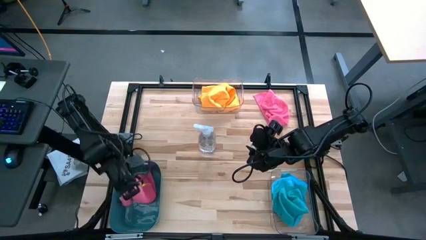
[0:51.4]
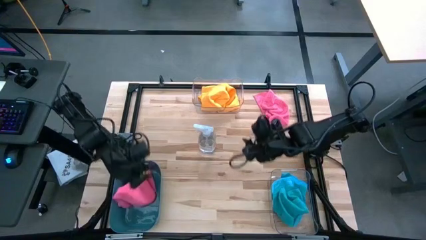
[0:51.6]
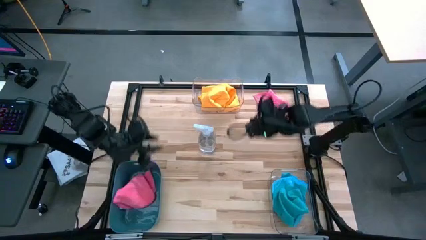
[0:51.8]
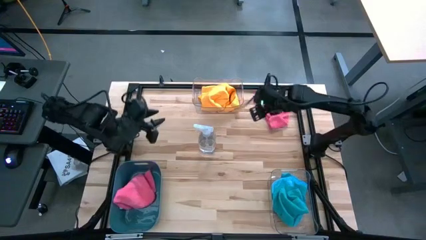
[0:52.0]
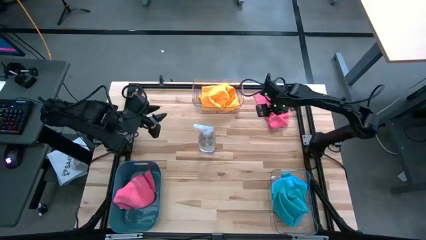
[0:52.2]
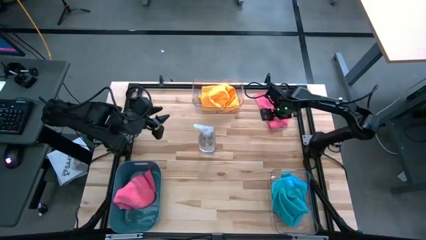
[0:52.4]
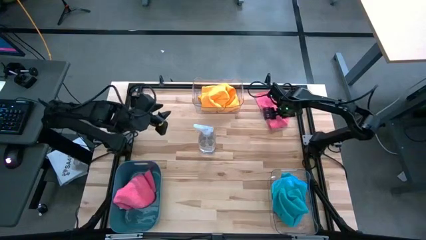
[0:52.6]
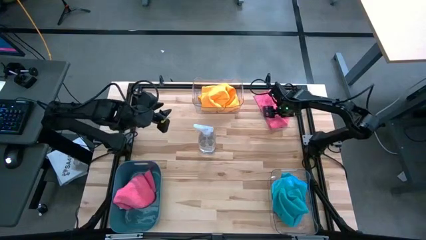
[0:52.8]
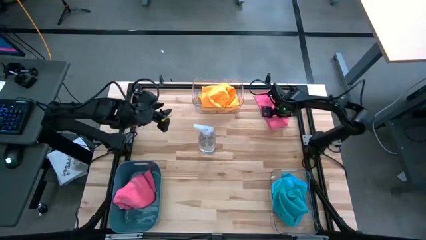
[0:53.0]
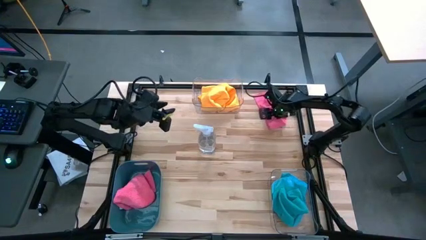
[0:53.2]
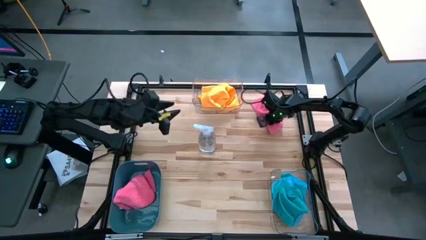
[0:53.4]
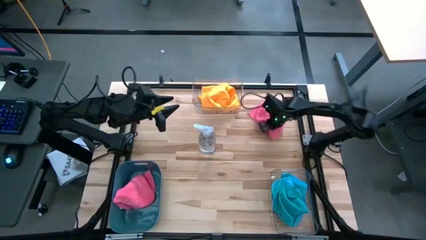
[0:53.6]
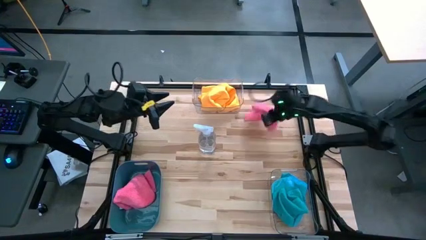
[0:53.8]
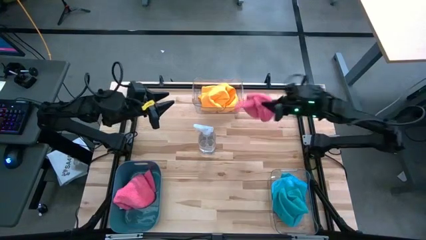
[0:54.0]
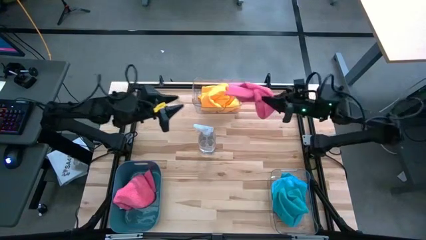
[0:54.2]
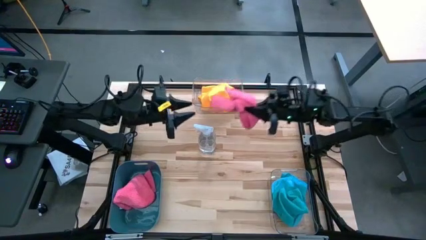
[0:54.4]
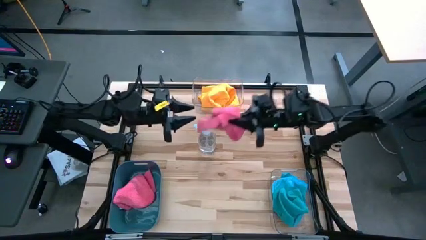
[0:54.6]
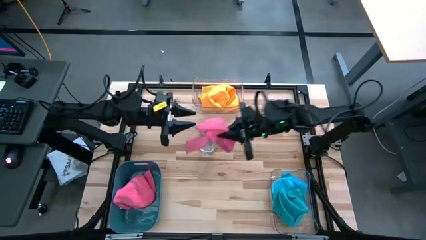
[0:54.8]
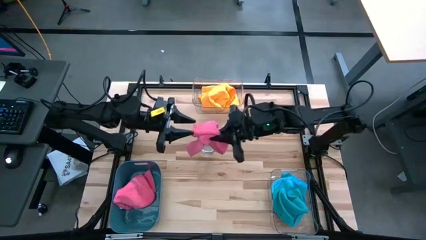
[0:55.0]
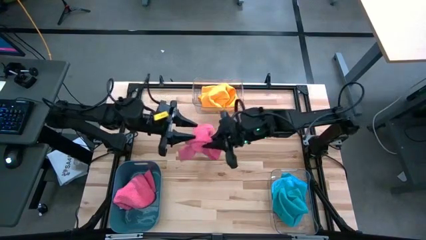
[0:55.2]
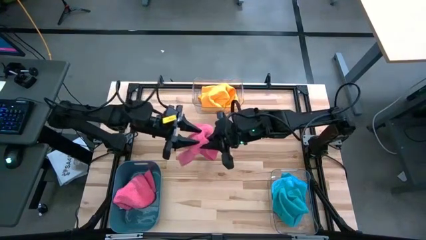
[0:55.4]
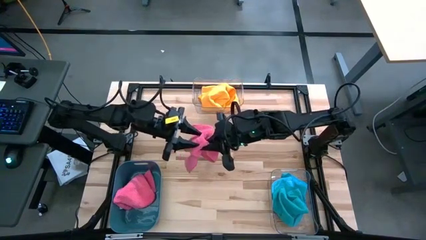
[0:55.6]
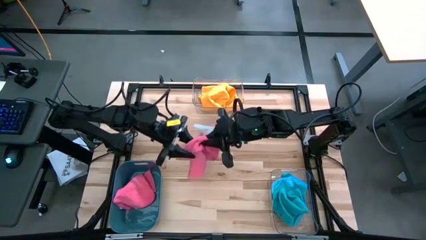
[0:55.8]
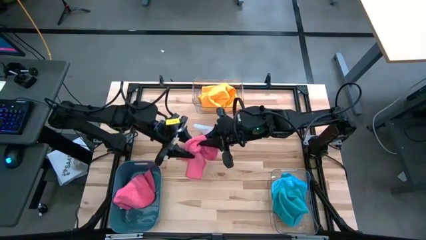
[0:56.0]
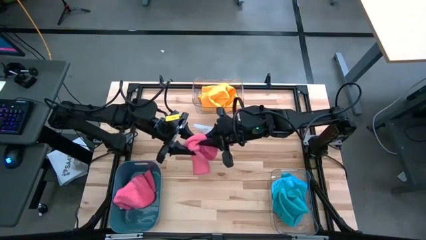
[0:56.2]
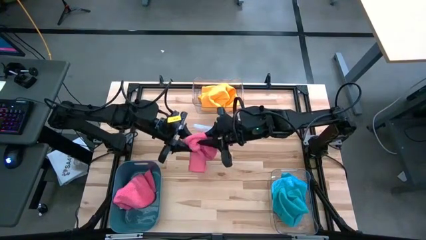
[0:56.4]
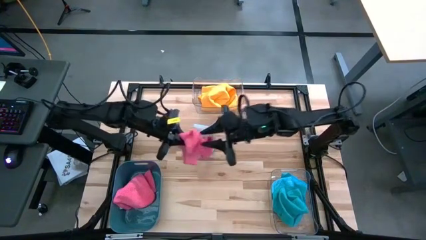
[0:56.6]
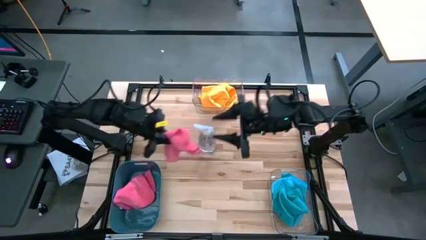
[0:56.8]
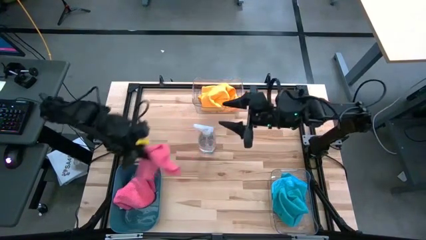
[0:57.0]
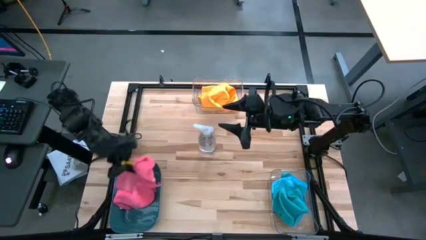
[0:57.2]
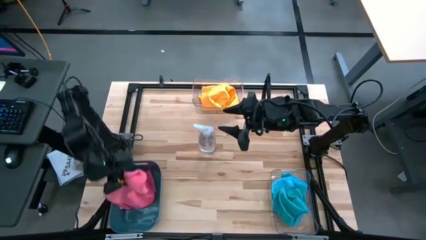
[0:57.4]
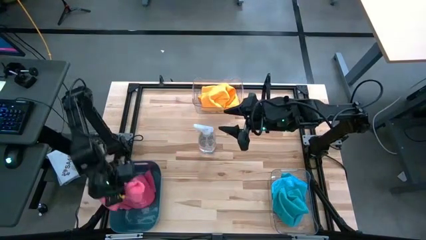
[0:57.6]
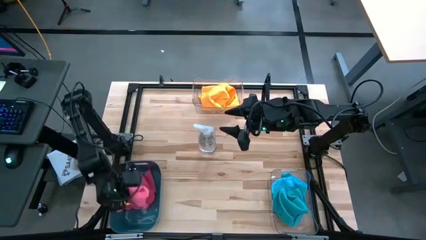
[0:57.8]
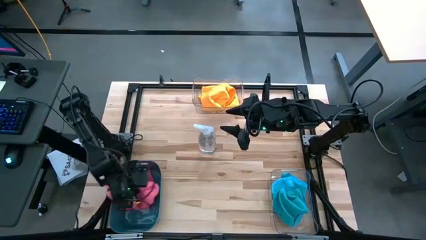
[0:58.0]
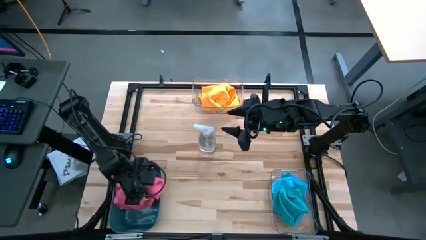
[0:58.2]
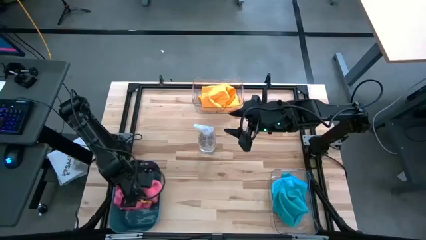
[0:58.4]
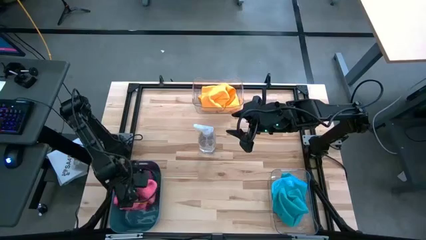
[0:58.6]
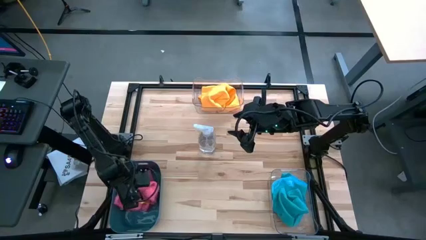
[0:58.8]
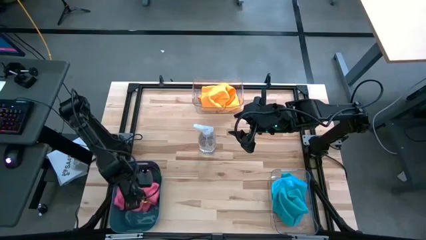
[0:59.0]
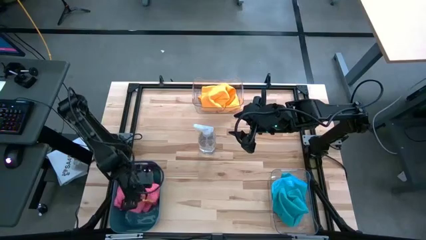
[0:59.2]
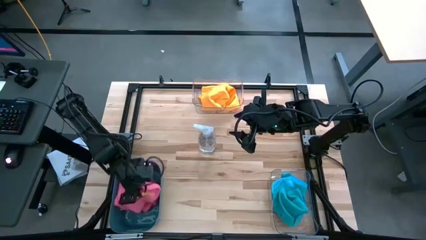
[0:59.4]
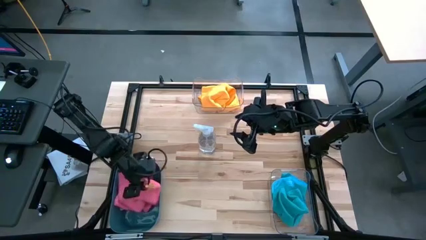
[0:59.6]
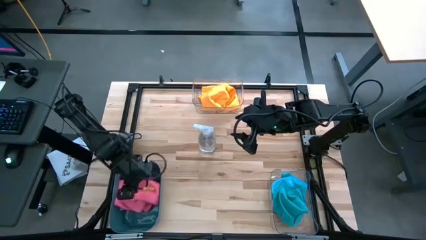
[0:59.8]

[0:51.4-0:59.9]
Task: Sort microfiber towel by color & place in baskets
Put the pink microfiber cloth into the blue bin

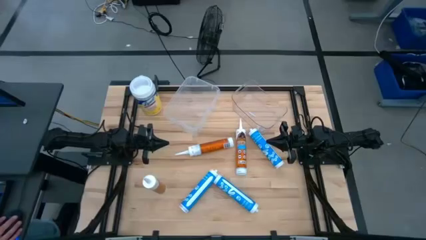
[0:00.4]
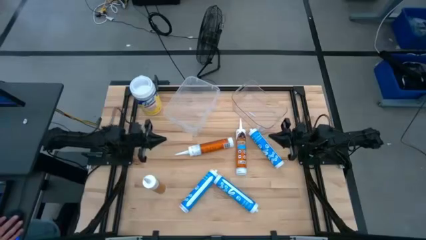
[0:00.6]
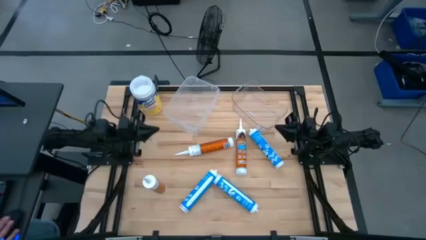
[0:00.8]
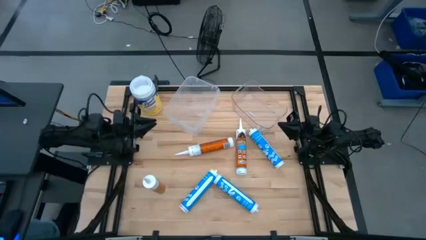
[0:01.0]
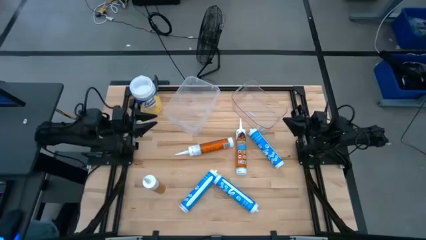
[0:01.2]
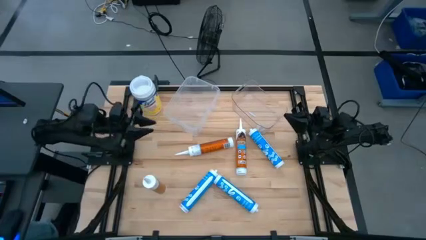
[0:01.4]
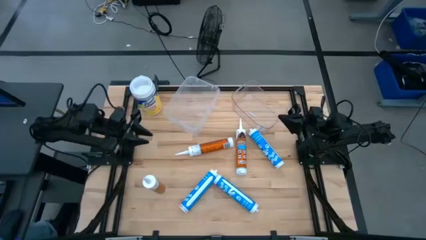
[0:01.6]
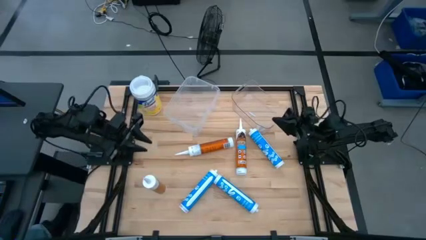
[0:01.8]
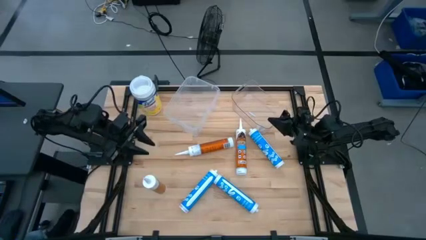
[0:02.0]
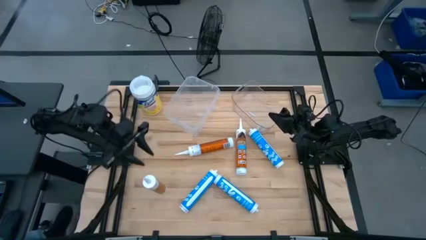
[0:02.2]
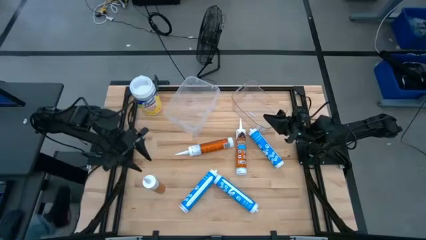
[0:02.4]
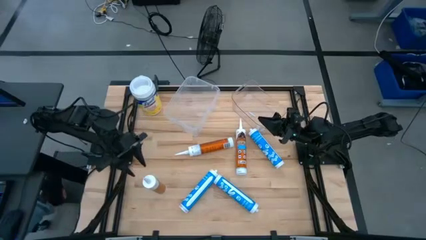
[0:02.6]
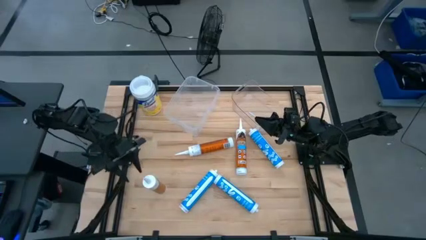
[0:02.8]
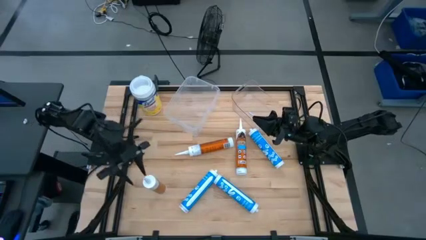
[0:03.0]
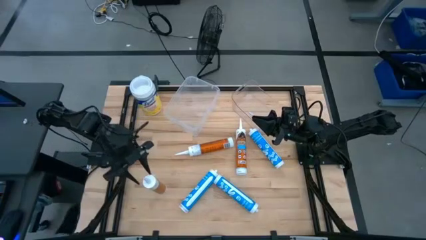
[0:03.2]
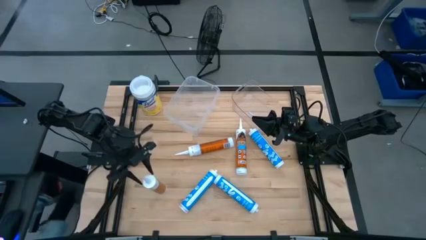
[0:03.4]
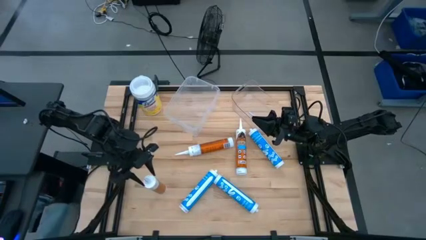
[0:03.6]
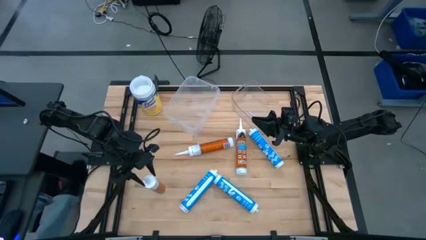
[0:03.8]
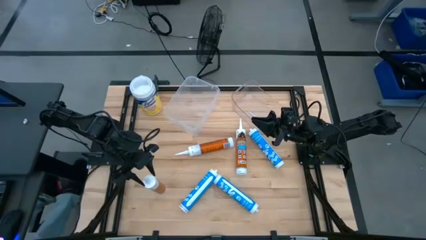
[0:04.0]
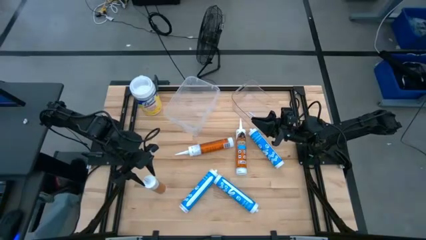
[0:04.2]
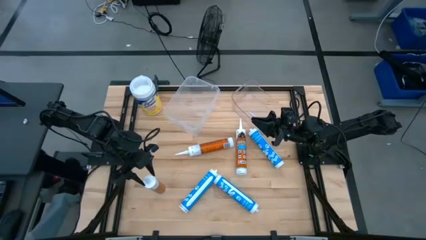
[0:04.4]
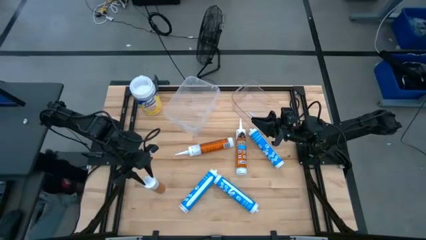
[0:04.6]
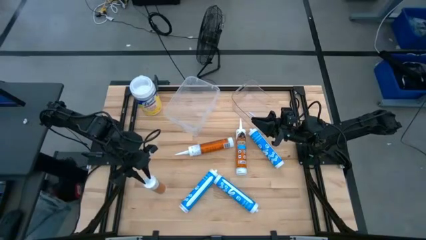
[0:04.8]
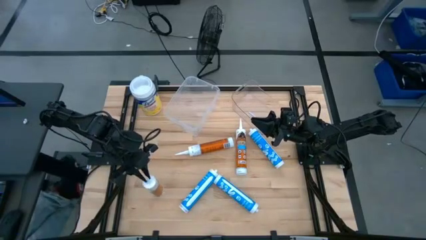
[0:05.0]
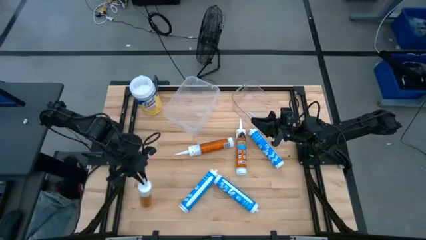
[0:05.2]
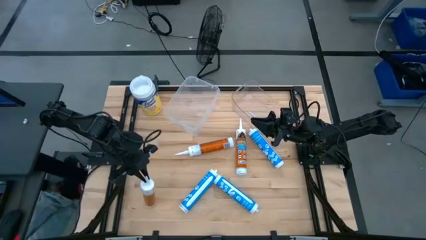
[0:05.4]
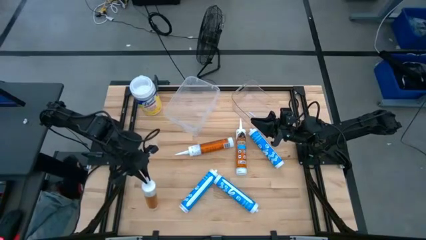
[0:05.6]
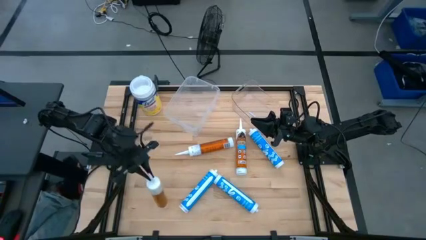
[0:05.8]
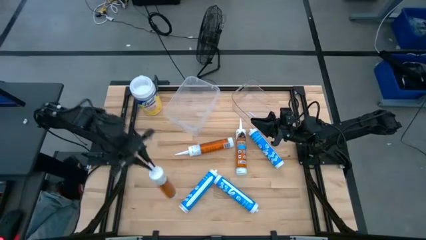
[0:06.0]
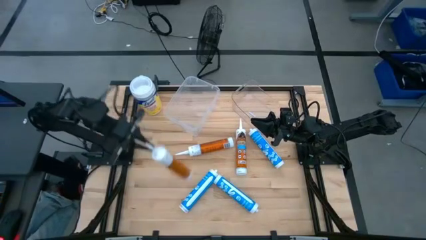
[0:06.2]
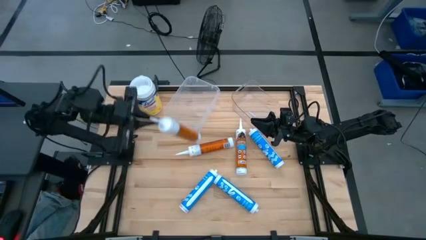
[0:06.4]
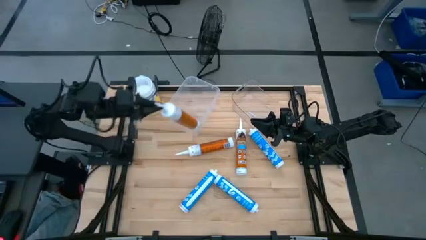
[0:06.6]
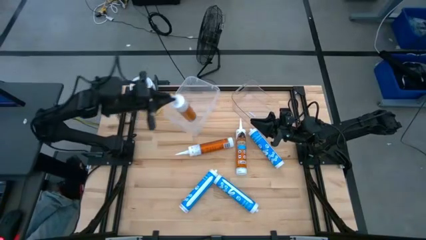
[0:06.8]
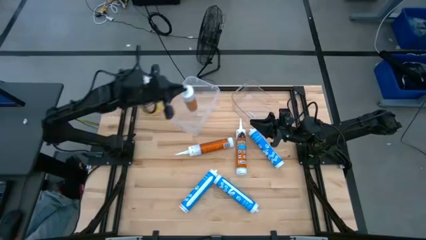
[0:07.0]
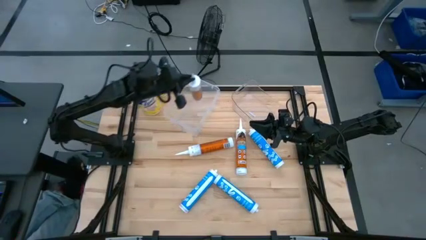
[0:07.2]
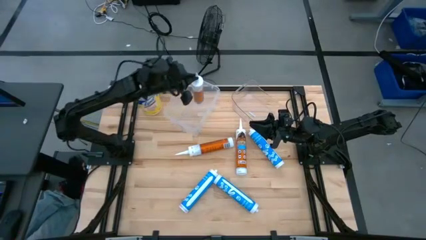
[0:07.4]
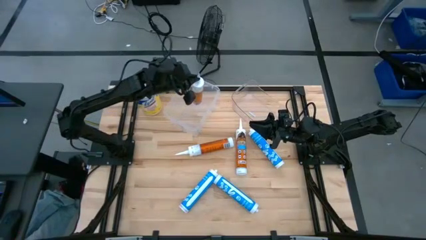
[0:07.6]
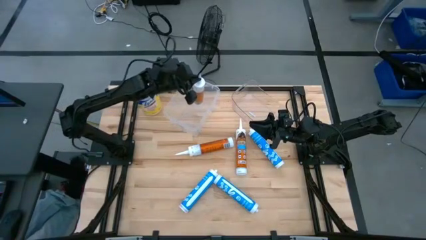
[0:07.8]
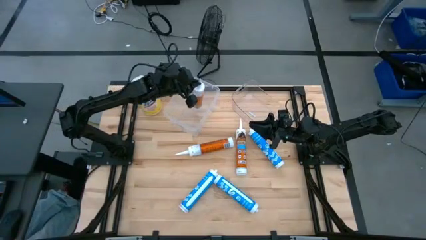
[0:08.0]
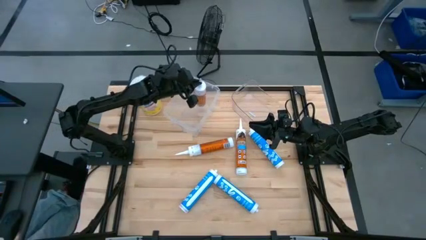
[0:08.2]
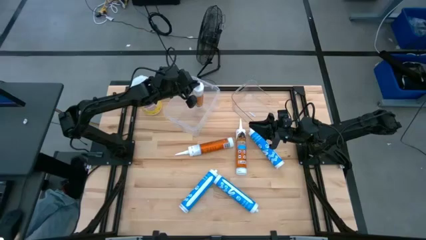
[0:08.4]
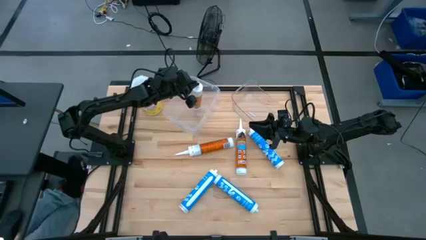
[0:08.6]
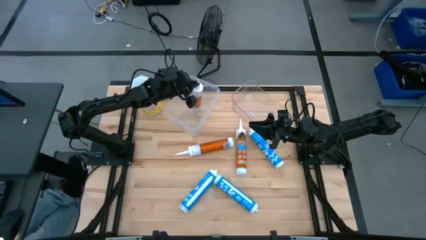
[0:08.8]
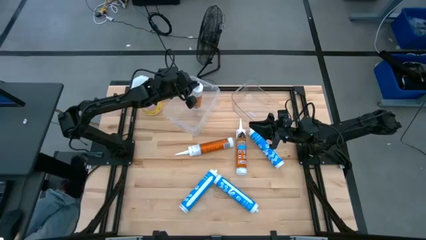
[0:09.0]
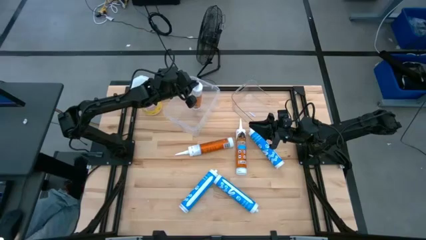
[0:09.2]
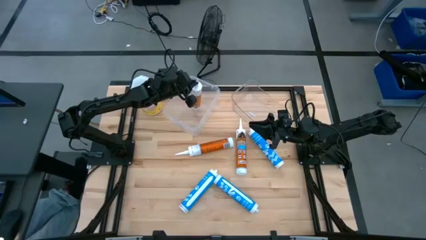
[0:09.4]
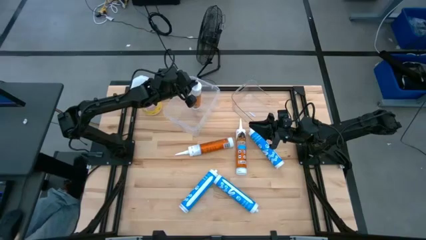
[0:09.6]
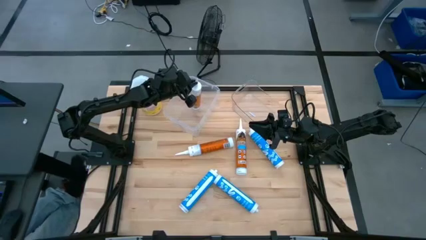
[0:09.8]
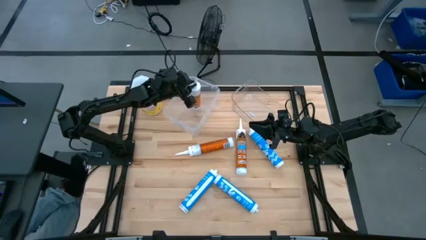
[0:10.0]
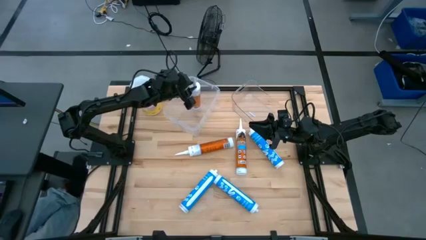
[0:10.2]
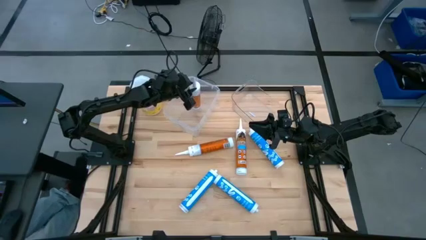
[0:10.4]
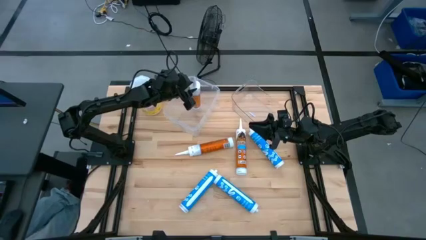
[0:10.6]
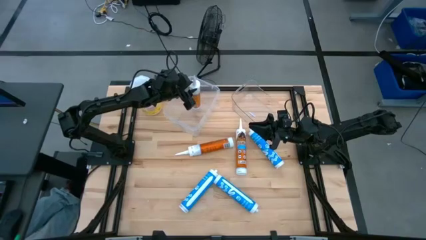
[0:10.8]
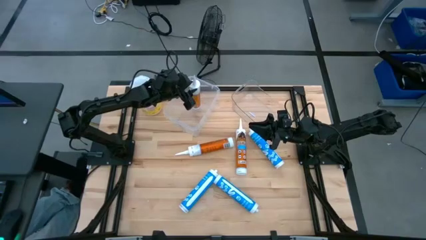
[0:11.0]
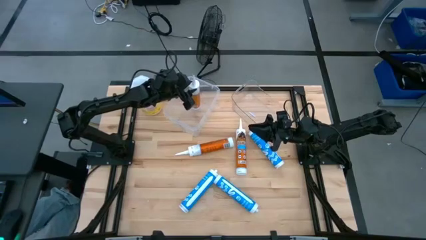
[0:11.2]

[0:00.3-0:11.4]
Task: Pick & place silicon tubes, Sealant and Lysol wipes
Put the bottom orange sealant into the left transparent bin
